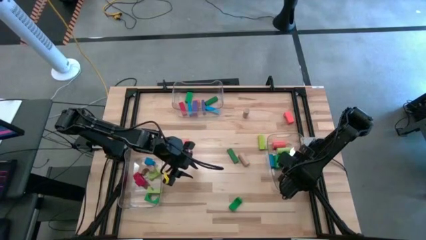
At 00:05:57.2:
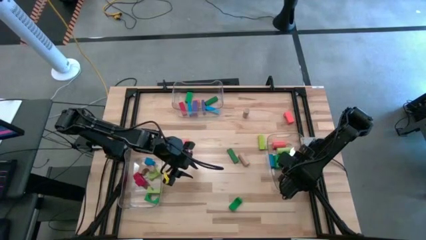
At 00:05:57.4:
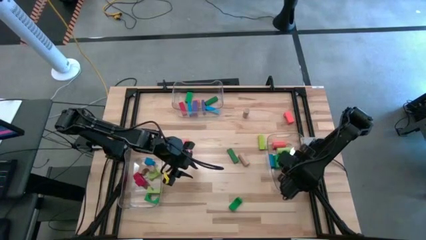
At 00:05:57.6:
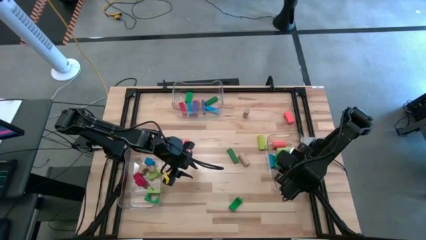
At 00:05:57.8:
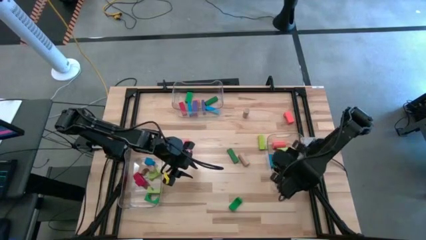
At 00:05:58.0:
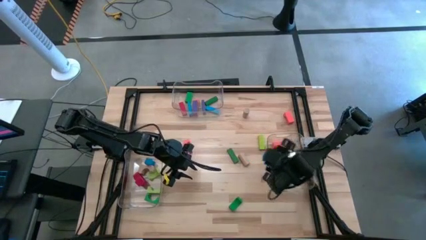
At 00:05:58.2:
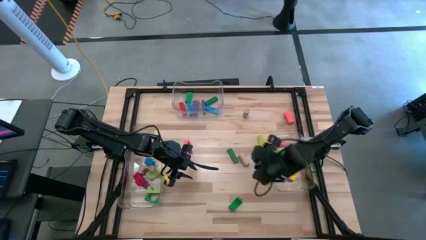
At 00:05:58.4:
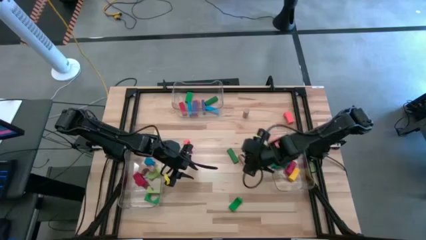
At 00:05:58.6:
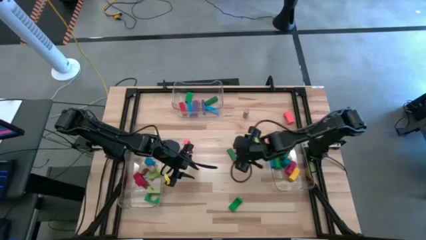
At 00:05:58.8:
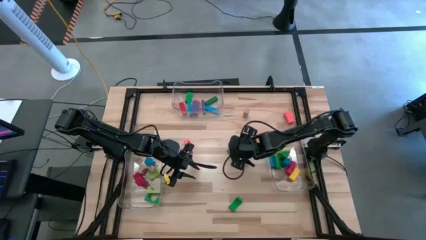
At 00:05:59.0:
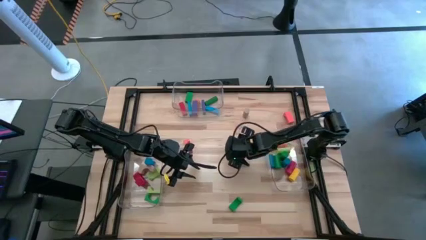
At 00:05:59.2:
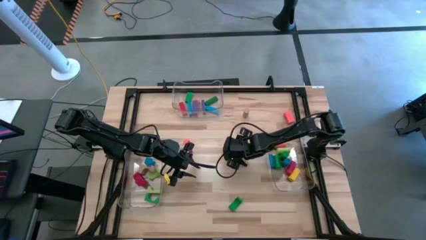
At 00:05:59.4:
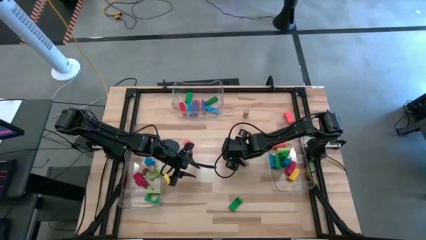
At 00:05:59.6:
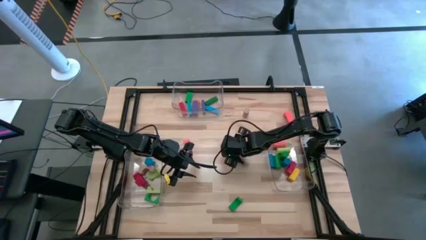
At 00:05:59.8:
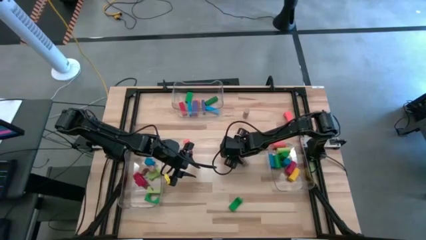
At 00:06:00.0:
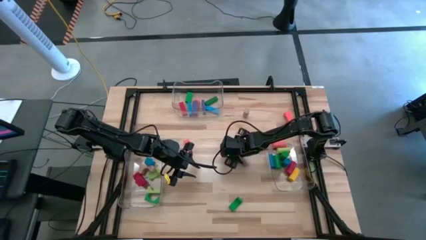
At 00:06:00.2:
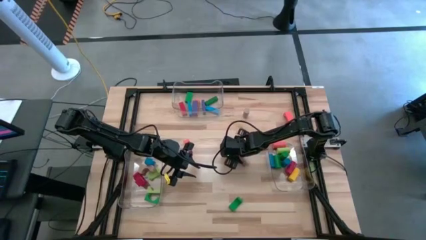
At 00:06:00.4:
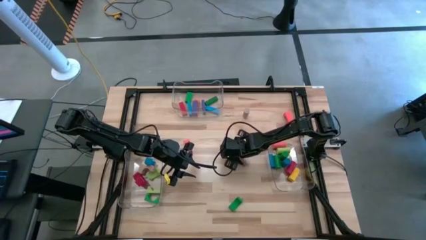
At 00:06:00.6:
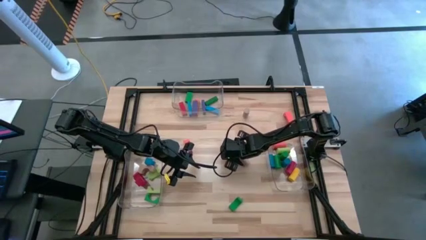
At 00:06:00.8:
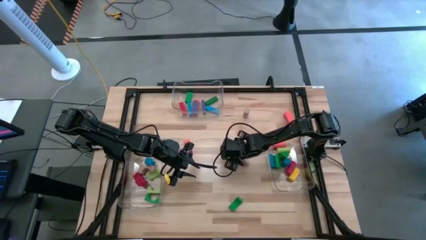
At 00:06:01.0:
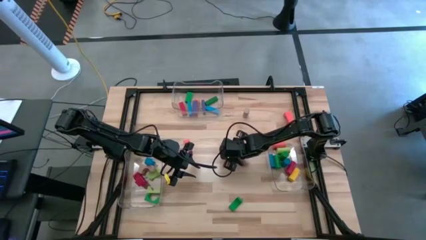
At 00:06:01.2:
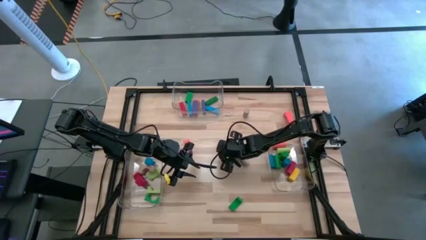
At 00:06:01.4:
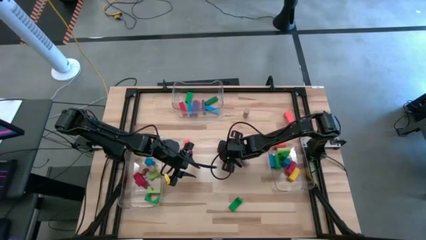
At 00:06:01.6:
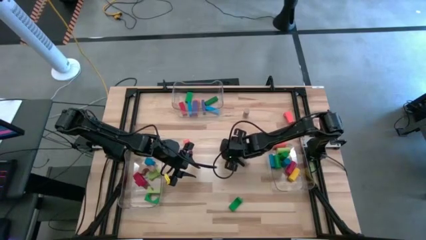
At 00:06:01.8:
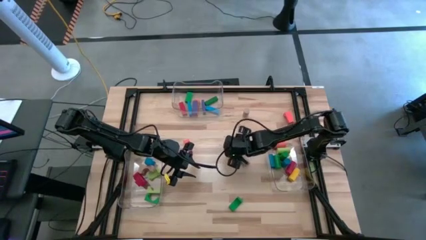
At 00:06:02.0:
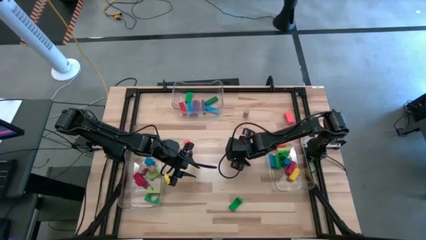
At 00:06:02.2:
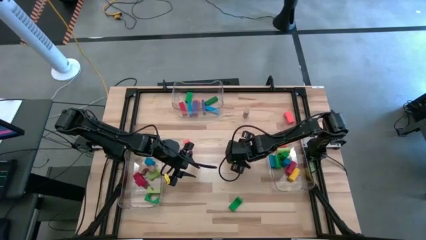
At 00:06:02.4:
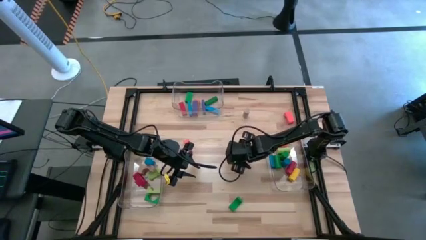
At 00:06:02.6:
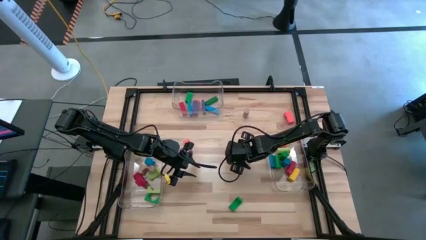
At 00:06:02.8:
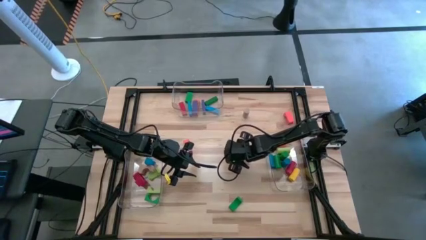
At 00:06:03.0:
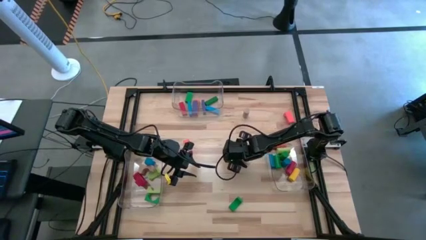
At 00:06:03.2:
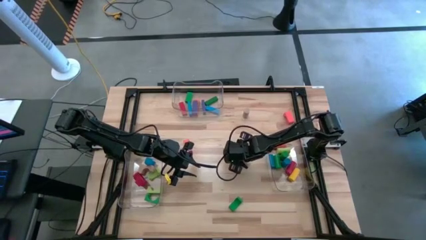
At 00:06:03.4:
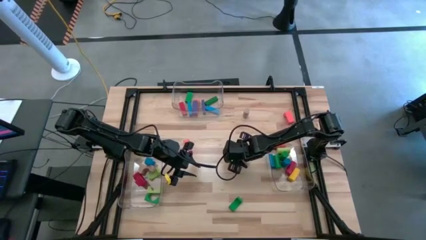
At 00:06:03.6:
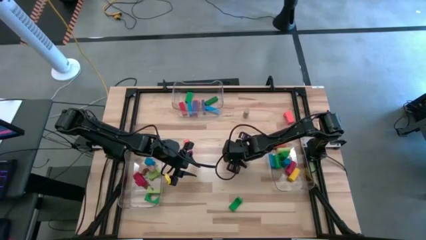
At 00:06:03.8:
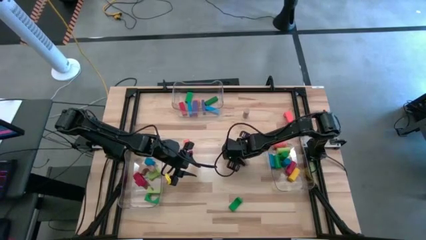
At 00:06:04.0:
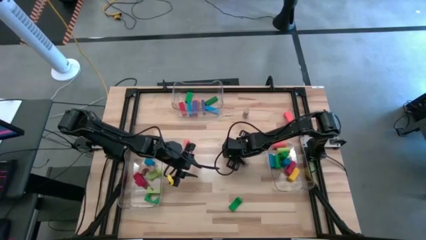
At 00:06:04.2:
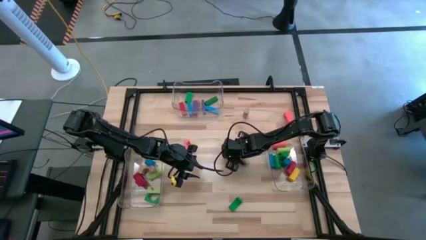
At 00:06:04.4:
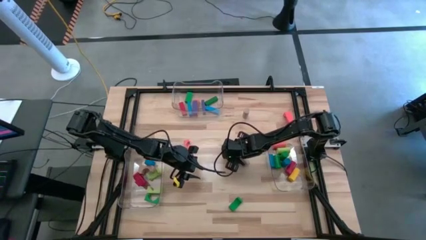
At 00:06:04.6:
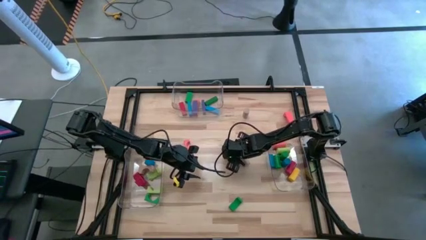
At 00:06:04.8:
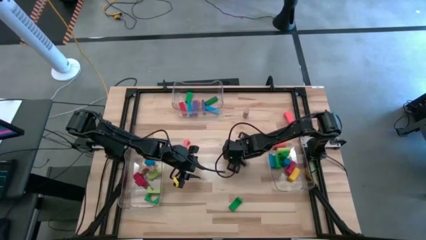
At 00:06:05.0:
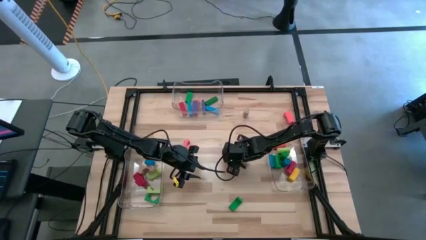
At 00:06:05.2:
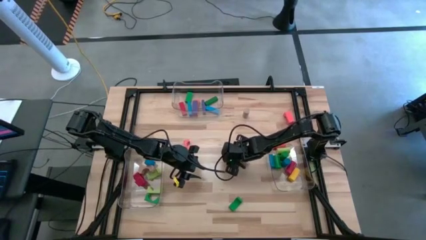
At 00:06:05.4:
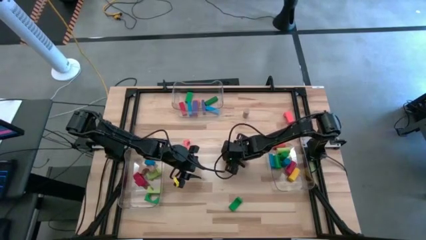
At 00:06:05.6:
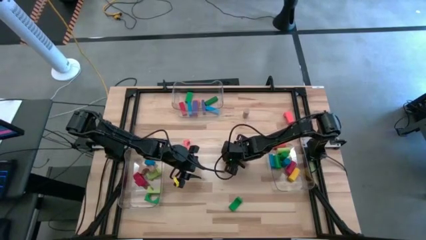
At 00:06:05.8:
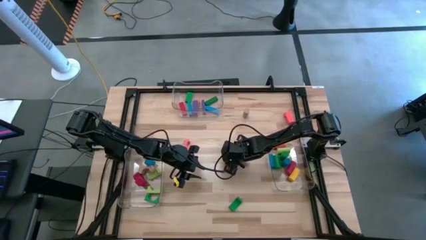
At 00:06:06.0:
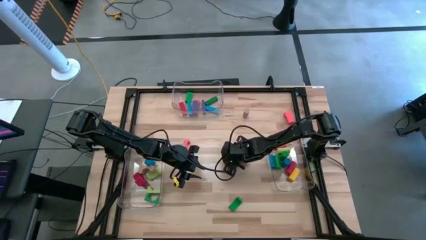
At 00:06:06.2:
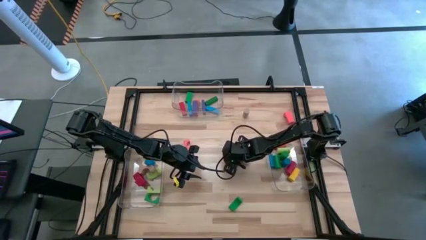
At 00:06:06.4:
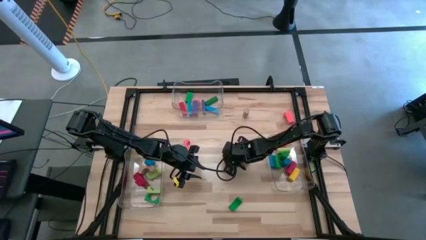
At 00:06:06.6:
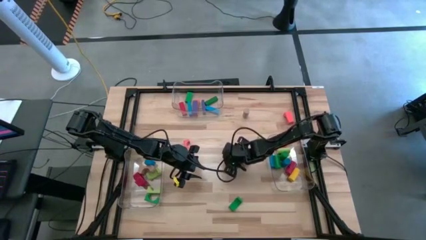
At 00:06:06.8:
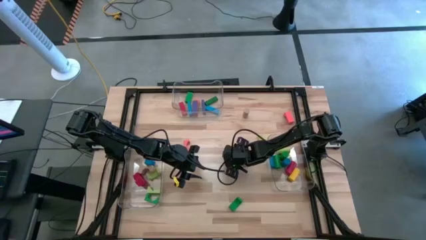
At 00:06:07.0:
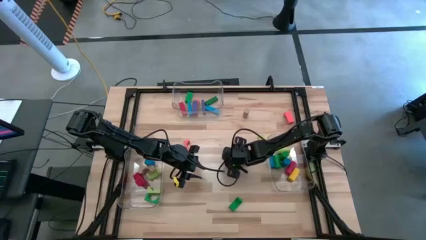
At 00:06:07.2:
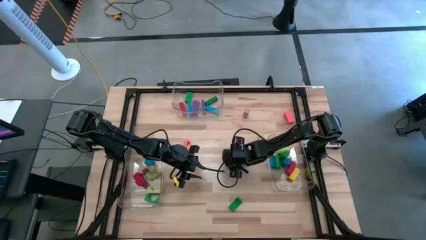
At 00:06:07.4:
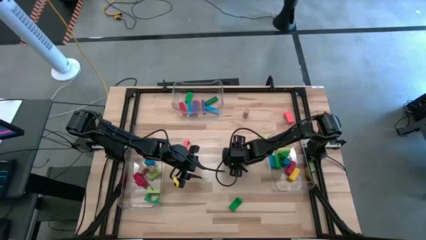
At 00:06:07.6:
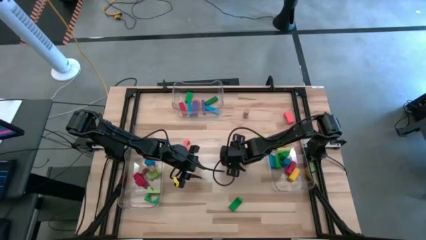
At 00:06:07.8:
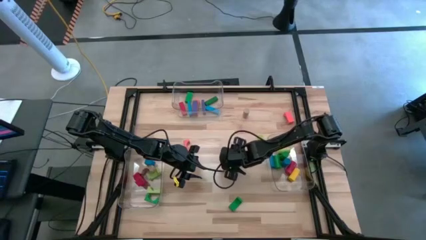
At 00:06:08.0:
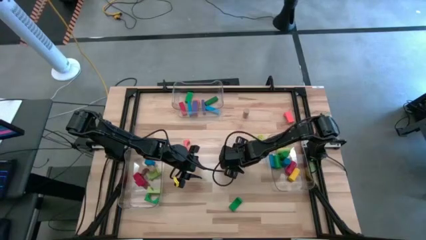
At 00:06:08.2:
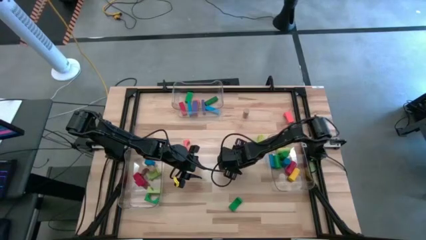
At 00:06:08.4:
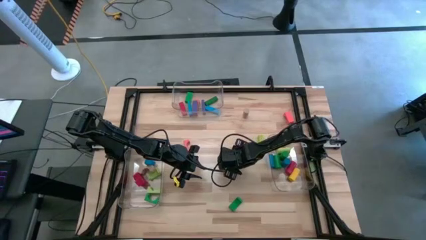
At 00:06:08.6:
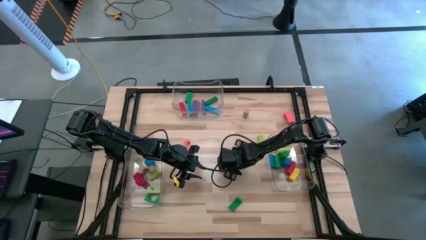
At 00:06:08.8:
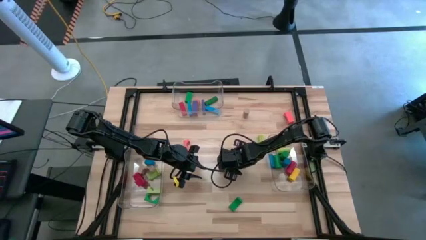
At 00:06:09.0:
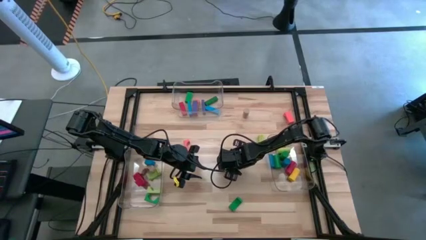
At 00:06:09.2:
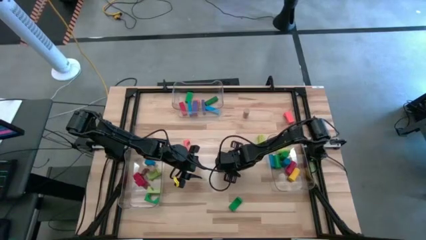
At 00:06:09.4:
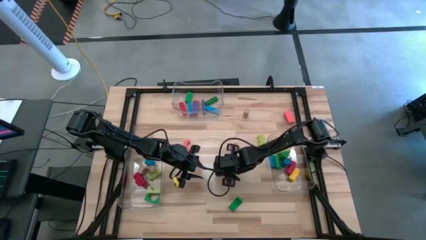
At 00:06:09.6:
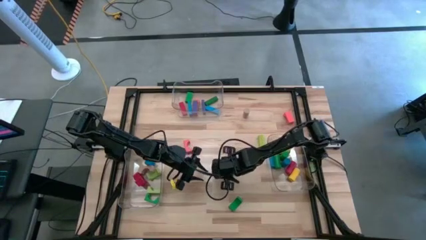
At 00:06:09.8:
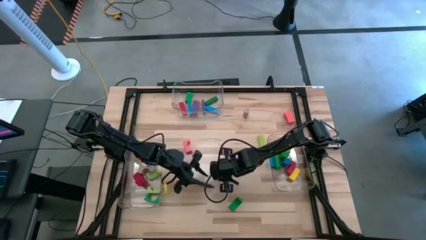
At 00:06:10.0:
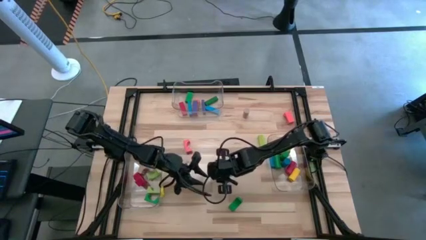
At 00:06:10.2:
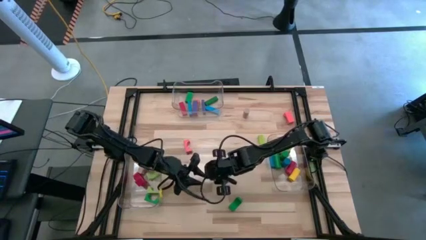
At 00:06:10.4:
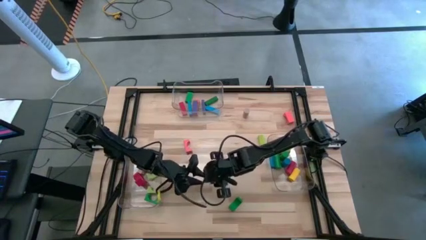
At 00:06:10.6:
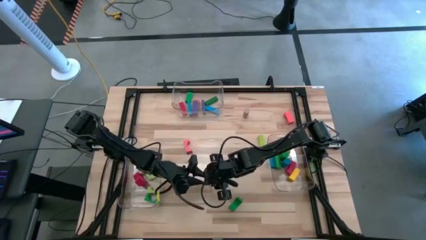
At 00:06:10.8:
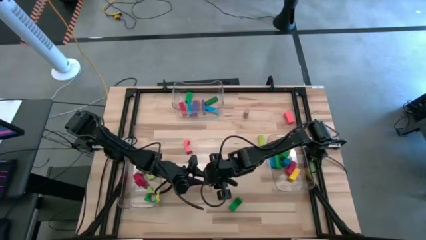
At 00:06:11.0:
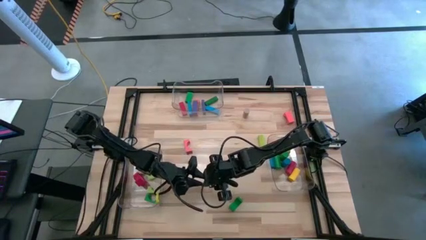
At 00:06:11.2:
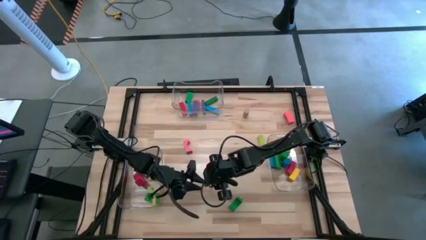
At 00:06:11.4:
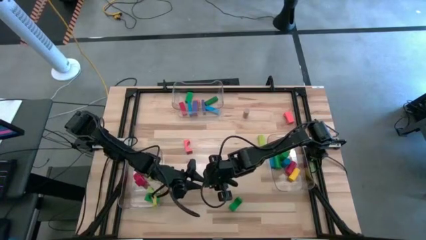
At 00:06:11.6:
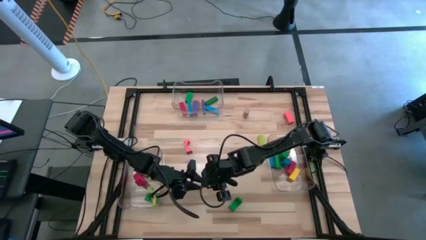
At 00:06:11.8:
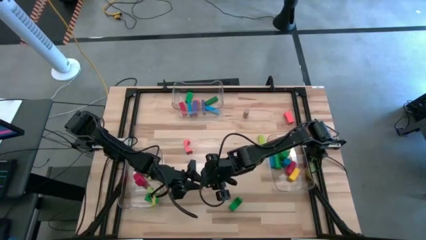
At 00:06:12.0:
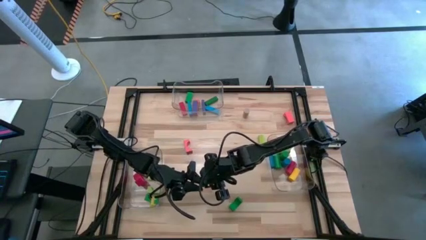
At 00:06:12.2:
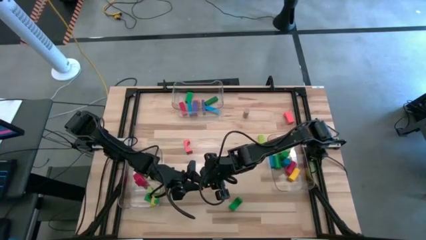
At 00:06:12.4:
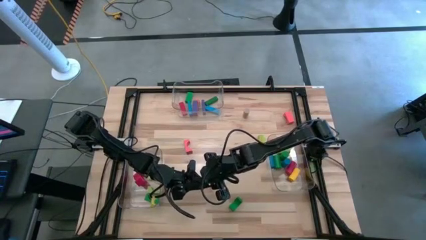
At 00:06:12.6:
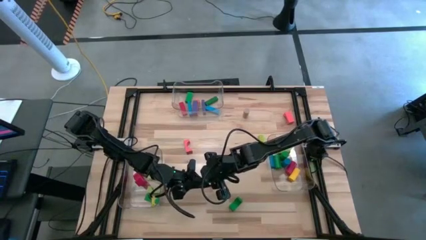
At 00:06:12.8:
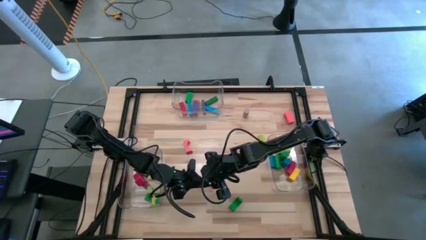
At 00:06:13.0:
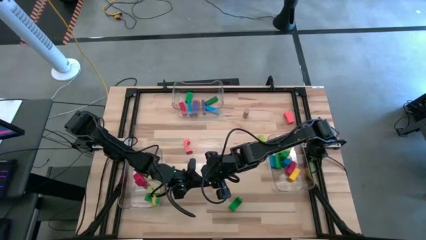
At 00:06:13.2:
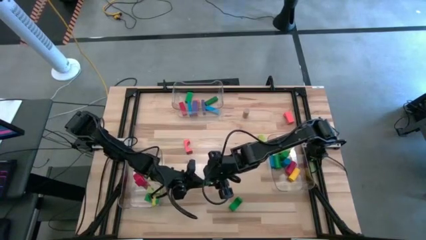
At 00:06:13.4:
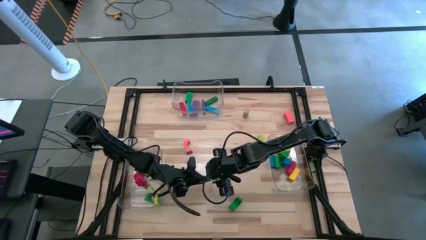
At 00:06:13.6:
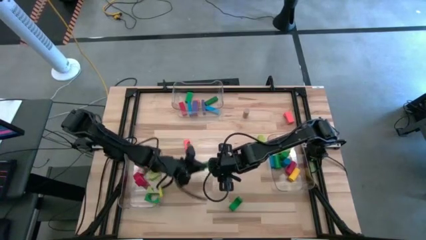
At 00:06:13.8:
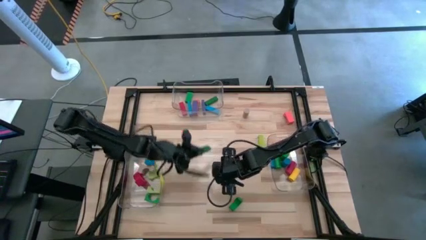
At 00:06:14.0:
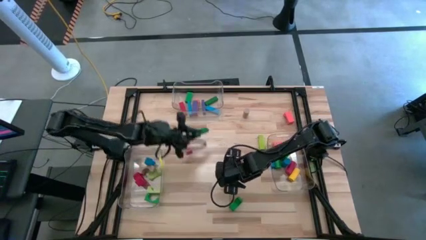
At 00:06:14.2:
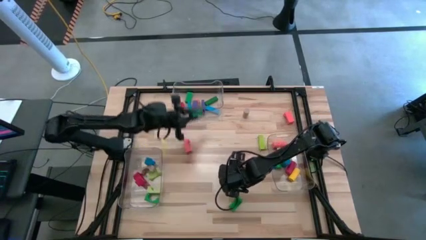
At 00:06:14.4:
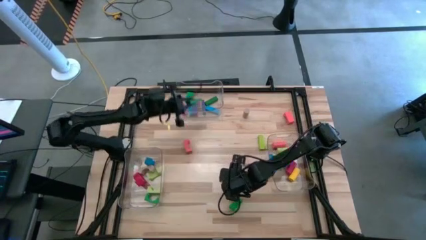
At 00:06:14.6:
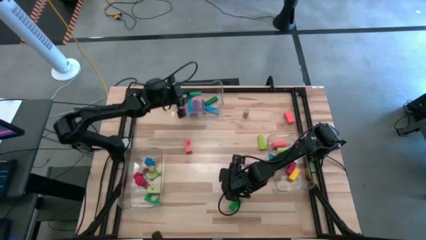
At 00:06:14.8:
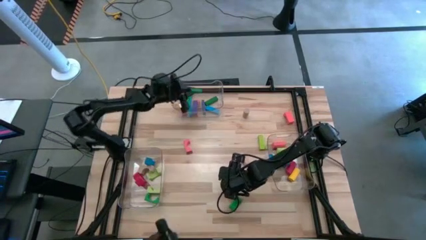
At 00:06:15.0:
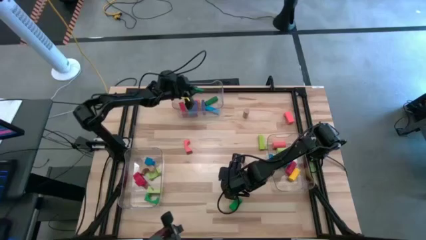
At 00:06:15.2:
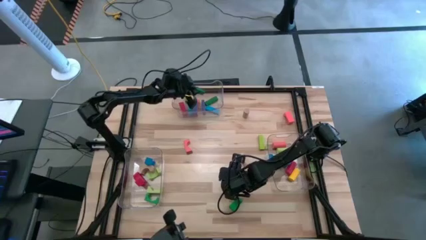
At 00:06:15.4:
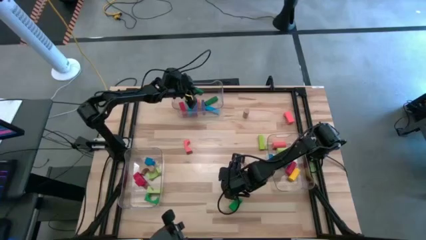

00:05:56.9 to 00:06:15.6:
Task: Sort blocks by size
Put the green rectangular block into the top transparent bin
